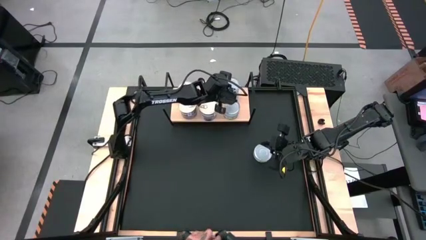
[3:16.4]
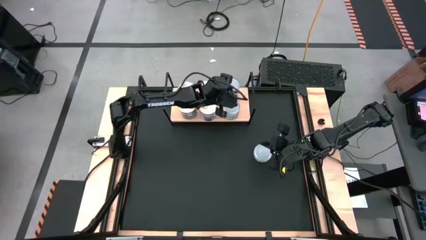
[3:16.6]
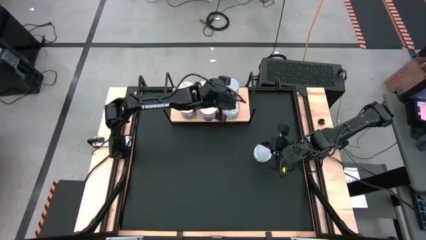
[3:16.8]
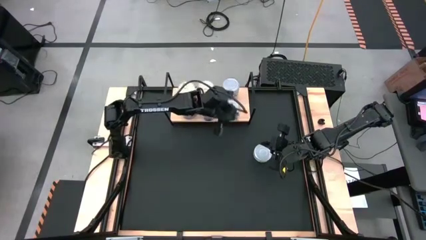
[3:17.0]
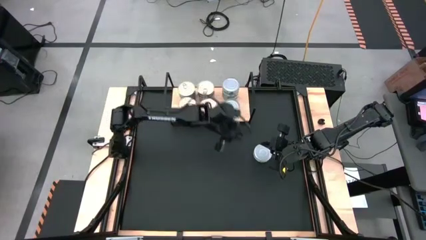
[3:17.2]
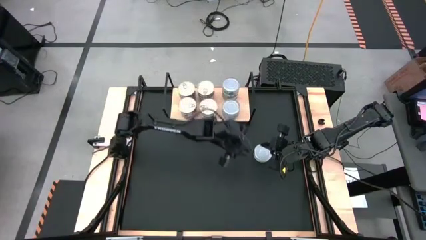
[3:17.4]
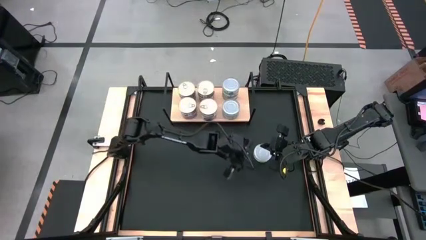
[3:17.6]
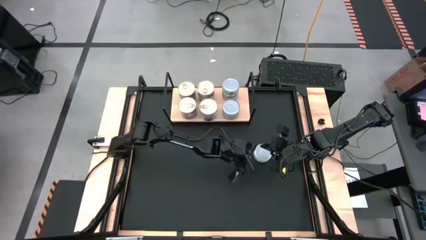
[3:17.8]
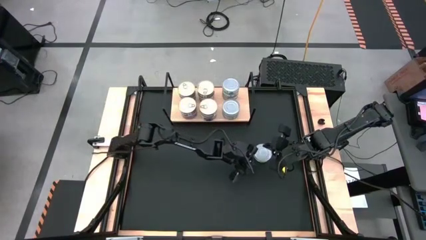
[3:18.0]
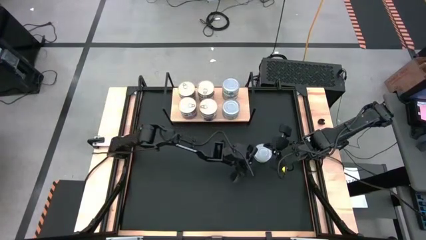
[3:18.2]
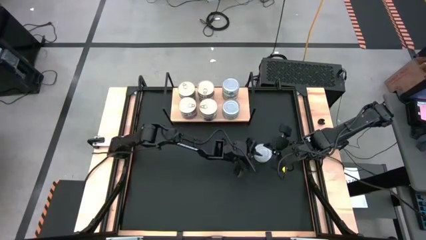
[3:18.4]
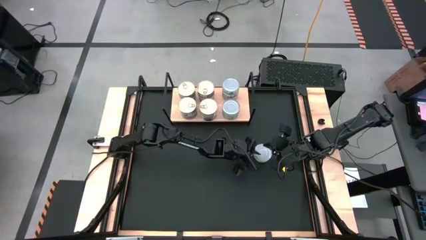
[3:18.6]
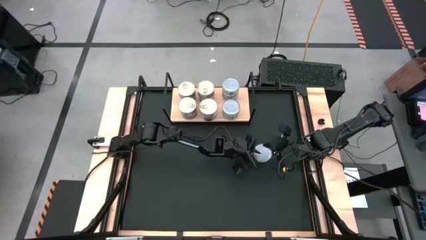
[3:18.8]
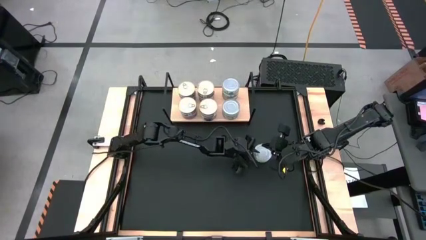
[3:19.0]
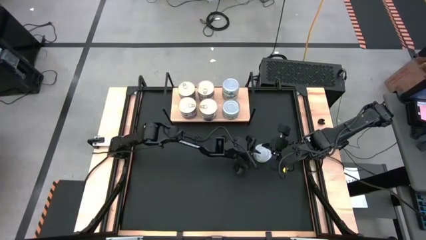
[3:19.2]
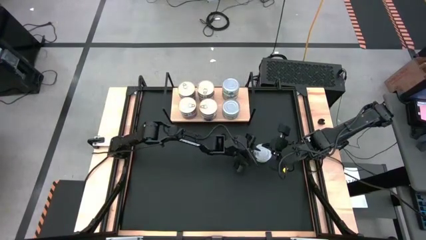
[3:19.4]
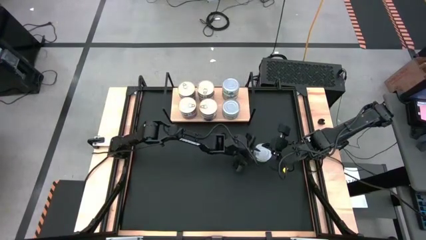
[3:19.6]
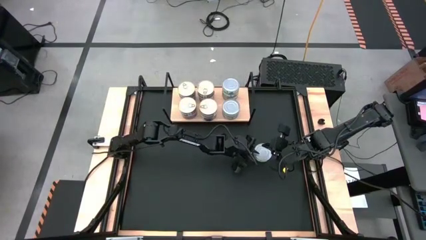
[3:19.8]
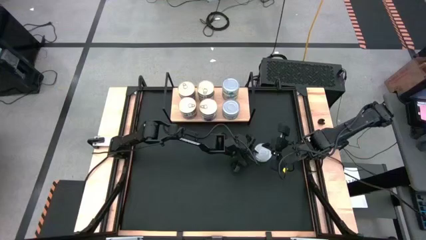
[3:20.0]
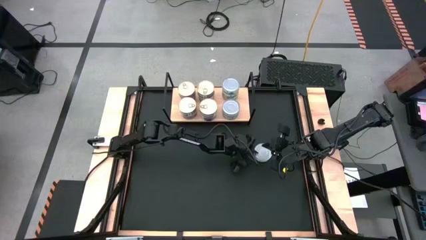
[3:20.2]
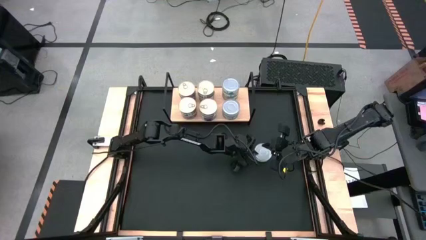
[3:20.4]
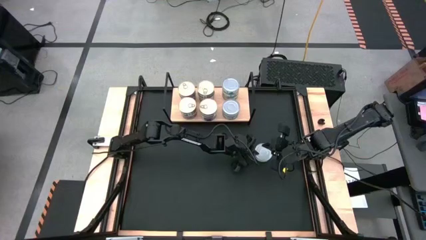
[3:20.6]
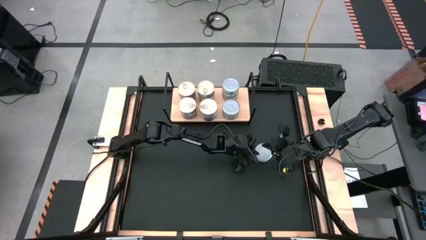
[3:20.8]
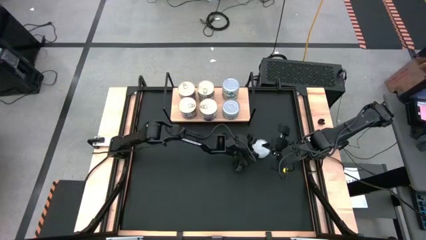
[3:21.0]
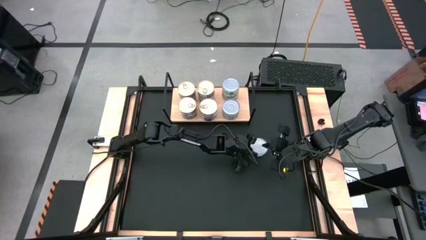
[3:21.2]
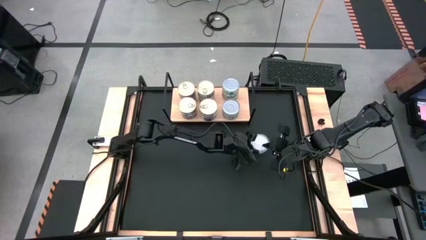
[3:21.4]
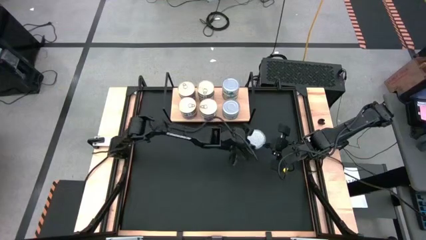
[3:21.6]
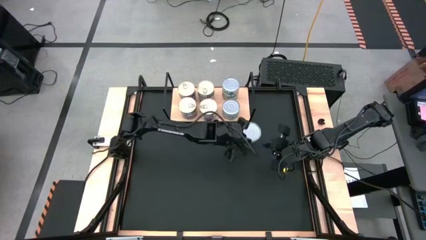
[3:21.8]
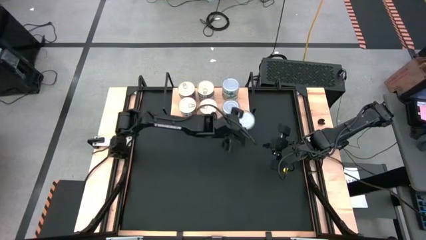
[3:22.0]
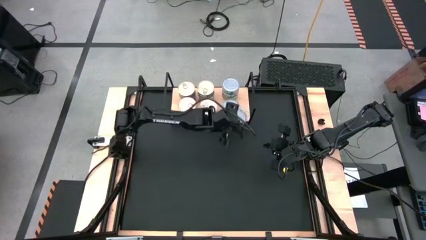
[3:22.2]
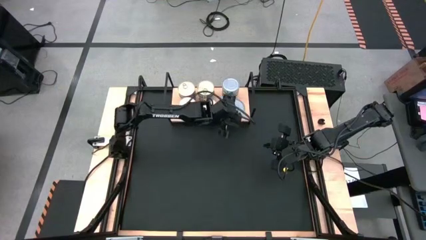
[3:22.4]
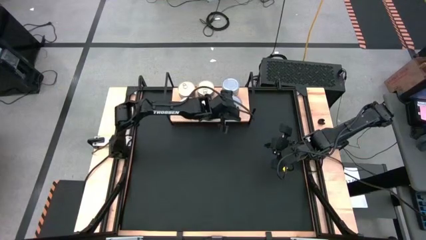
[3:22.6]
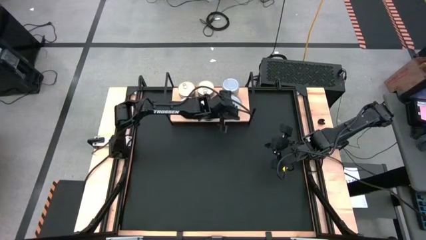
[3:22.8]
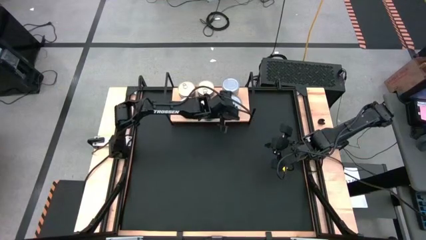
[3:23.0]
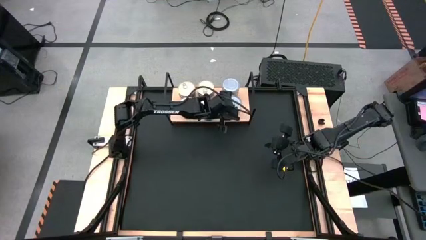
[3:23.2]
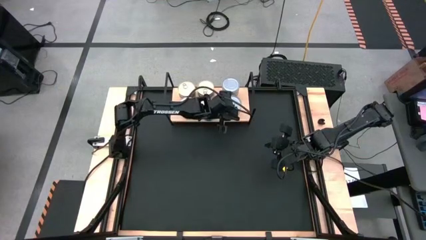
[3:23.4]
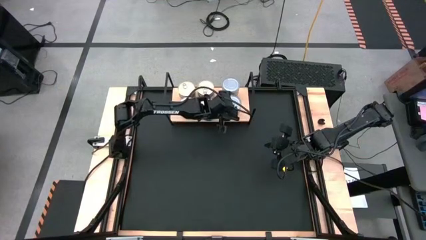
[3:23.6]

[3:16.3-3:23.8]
Task: Stack canned seafood by type on shelf
Stack the green tuna can on top of the green tuna can on the shelf

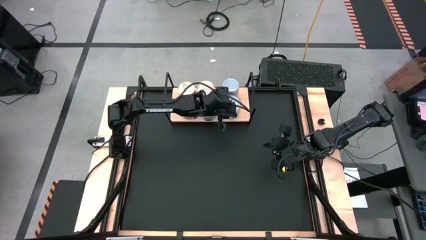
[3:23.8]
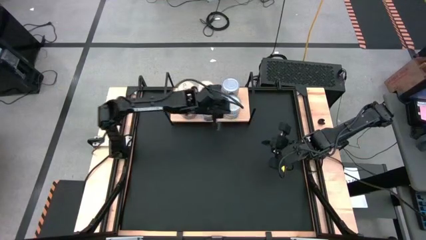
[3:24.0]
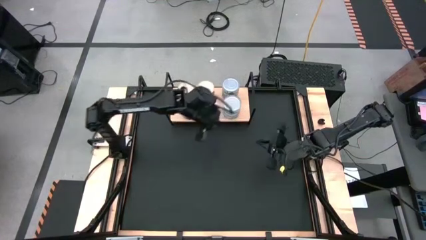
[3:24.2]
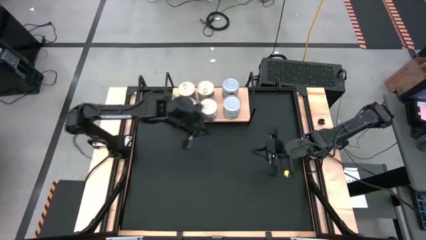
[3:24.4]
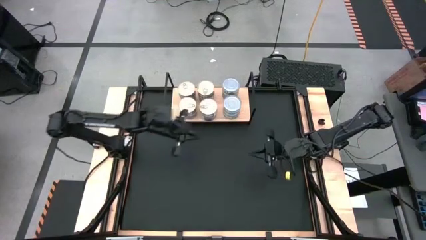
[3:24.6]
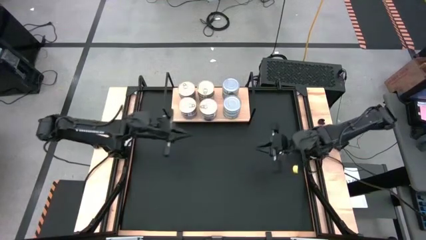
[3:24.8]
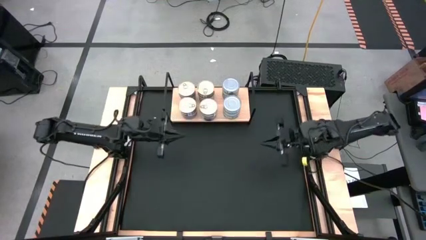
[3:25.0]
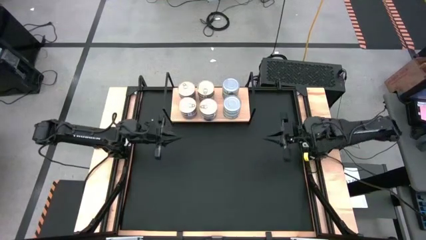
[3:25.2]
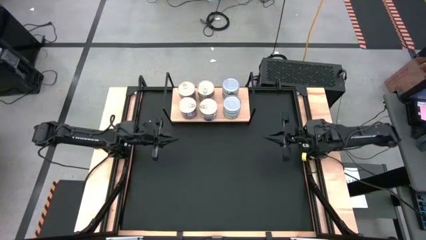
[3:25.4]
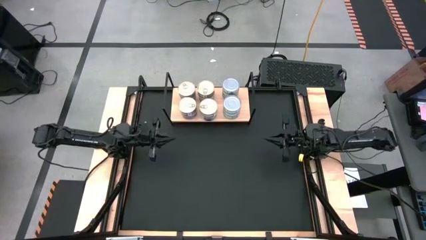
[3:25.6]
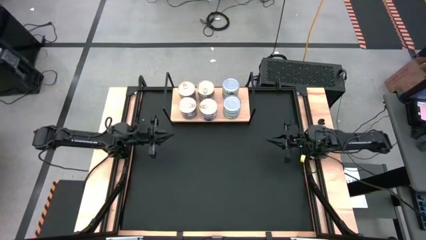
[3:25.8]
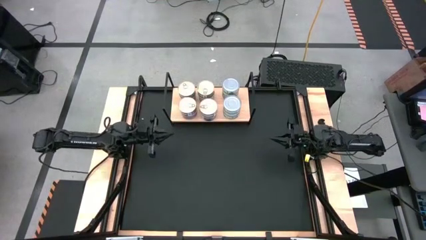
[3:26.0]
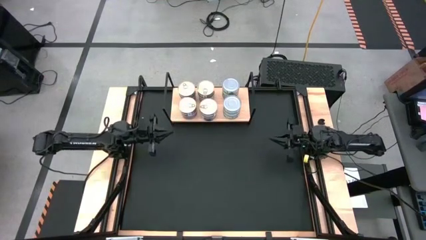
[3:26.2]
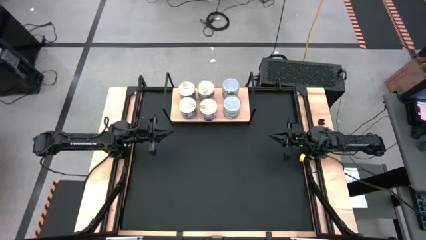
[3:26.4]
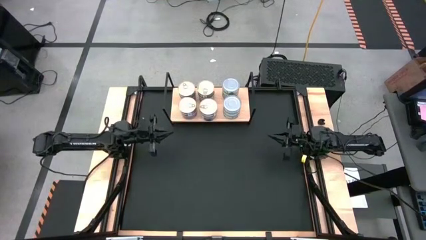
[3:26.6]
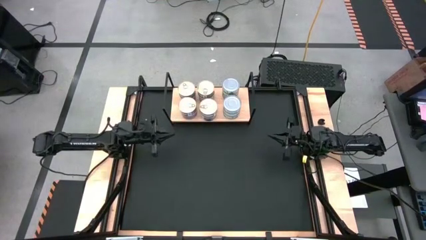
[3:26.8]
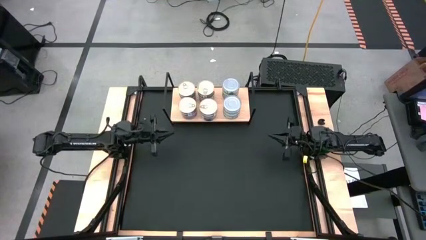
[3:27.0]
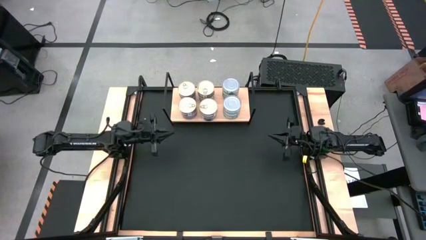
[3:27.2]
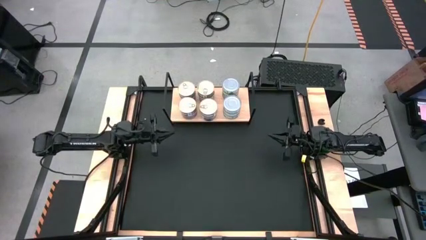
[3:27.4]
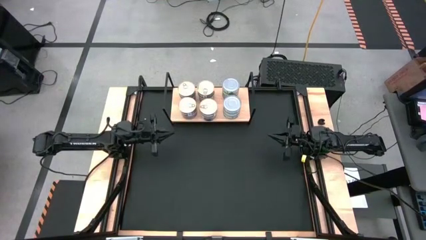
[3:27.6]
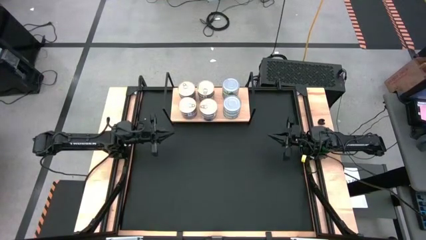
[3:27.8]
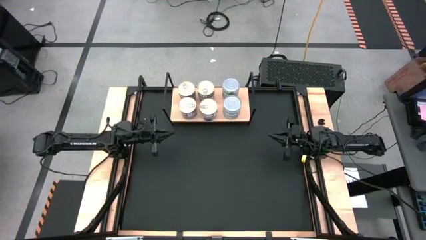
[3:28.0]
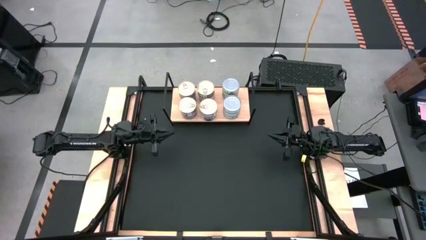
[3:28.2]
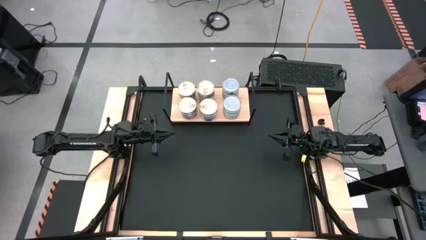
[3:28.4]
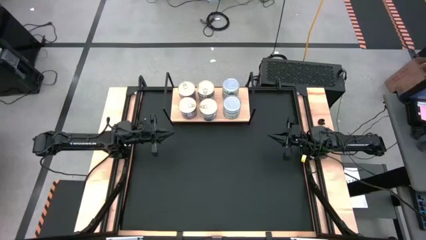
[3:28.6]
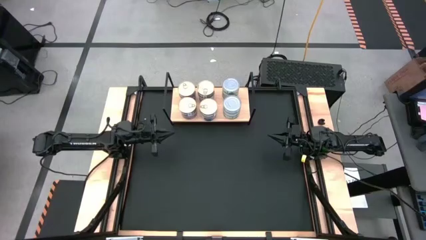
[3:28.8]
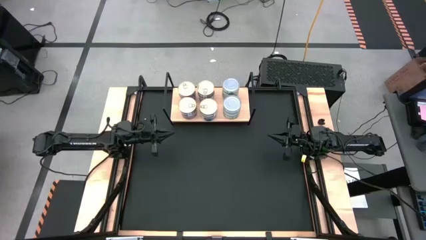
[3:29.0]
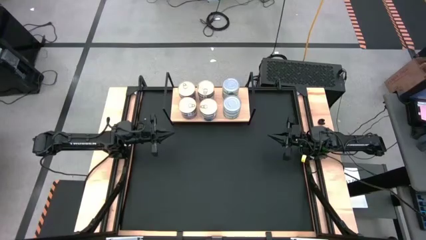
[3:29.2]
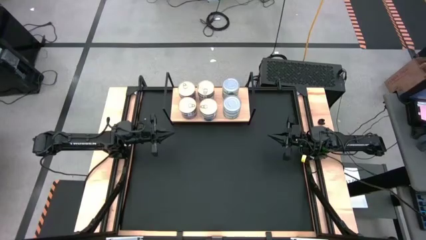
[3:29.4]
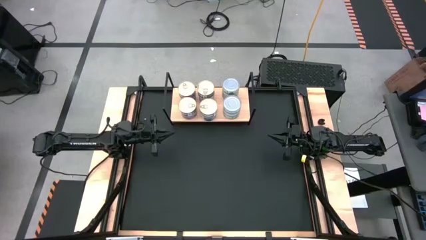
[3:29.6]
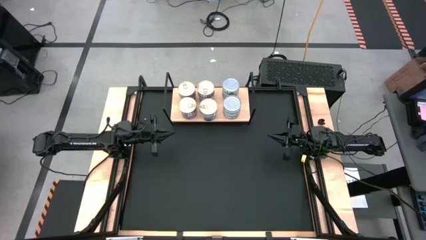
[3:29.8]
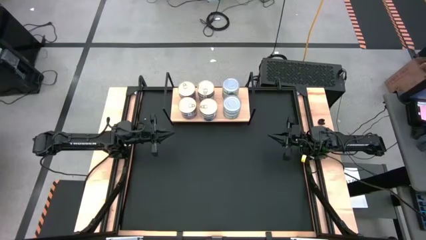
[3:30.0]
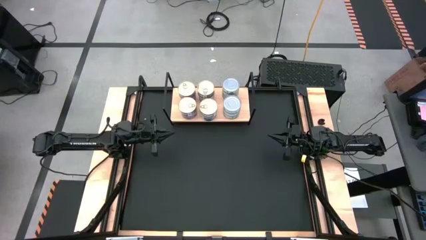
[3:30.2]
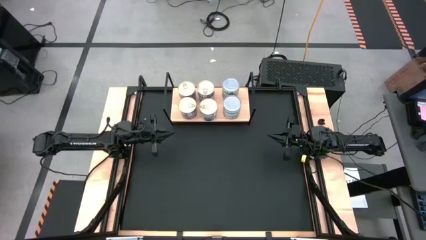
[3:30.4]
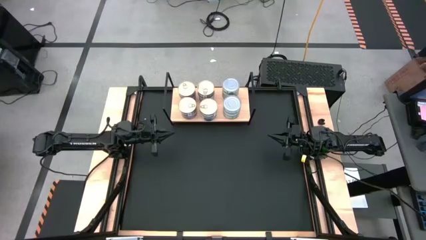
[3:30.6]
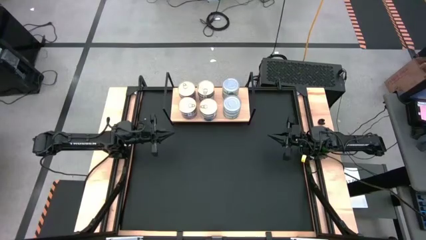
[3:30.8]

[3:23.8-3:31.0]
Return to Home Position

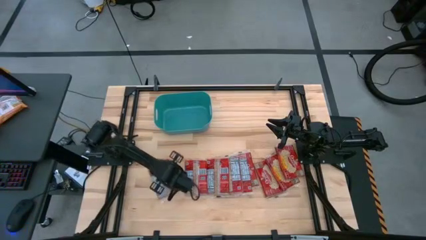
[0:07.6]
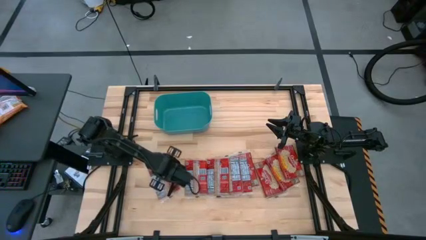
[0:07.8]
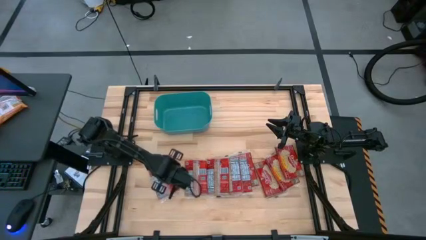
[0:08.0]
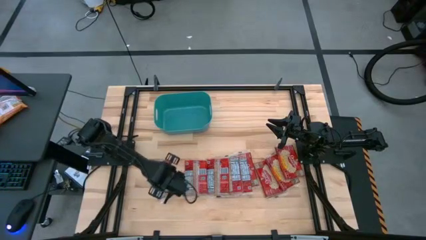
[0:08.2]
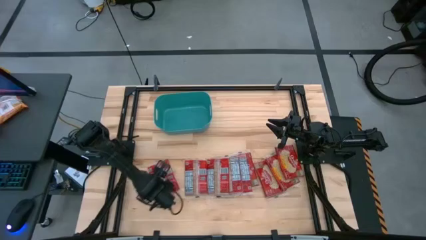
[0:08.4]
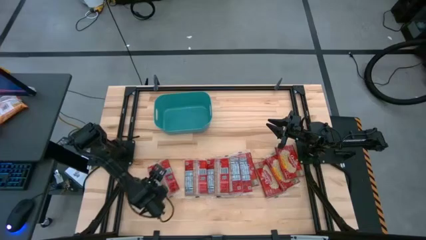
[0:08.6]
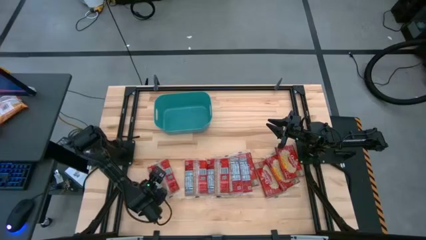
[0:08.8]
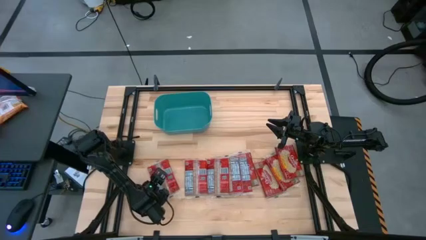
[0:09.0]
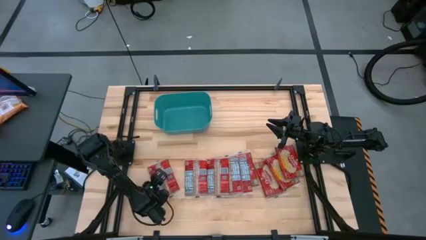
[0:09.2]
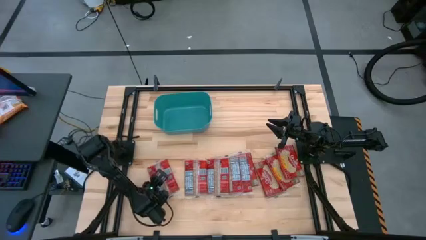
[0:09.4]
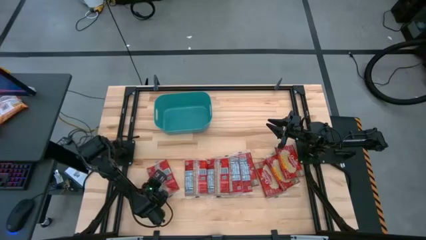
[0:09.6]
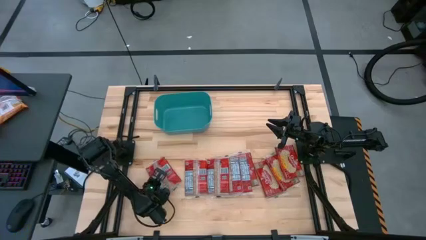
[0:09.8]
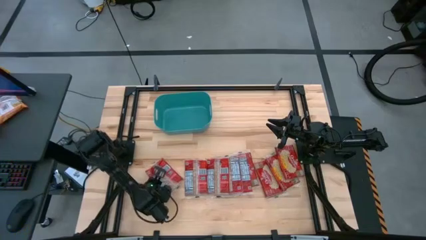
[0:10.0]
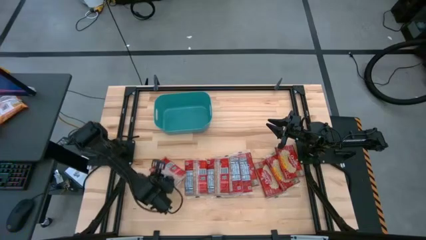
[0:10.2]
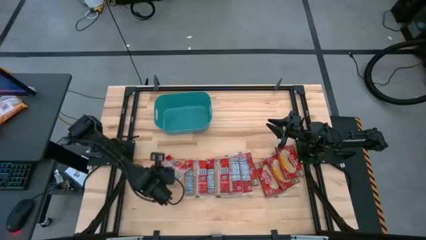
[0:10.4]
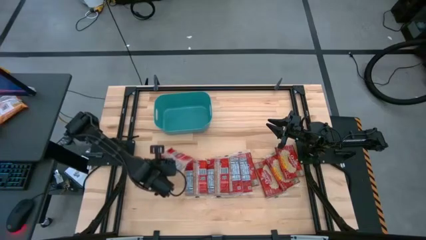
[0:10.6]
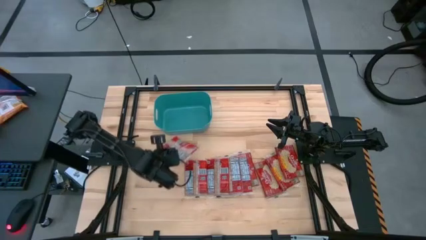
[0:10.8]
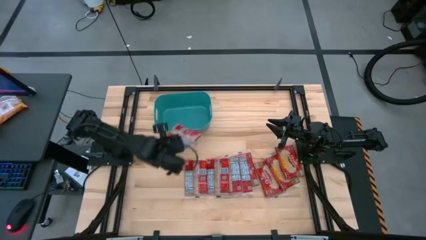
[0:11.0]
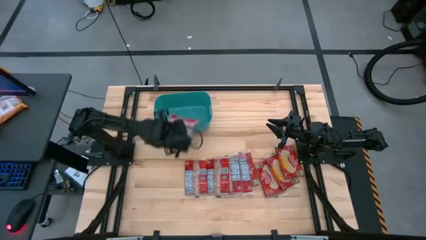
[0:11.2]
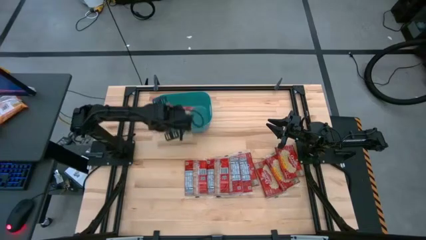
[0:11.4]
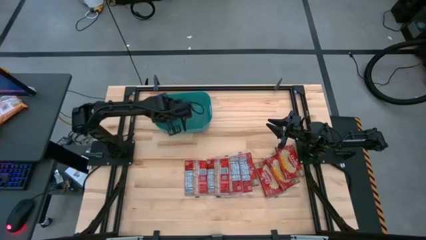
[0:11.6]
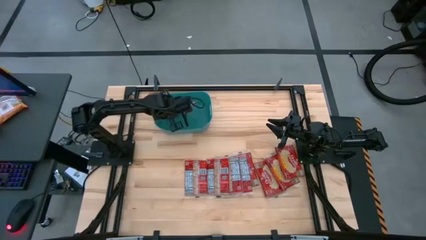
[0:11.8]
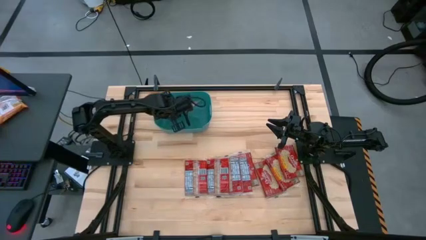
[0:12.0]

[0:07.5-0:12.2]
Task: Sort popcorn bags into baskets
Put the popcorn bag into the green bin
